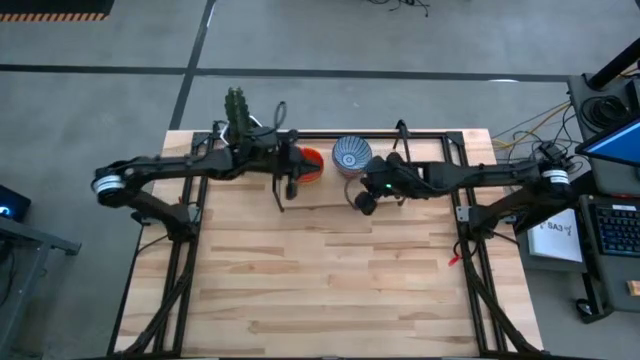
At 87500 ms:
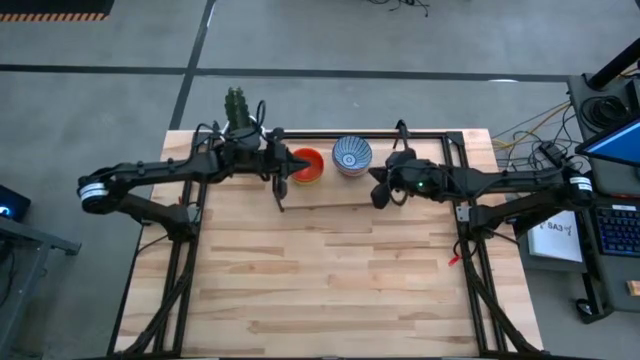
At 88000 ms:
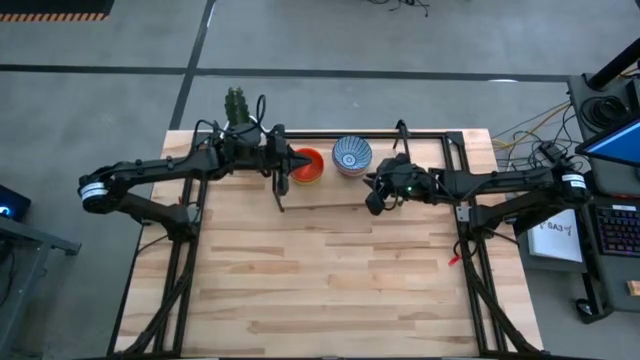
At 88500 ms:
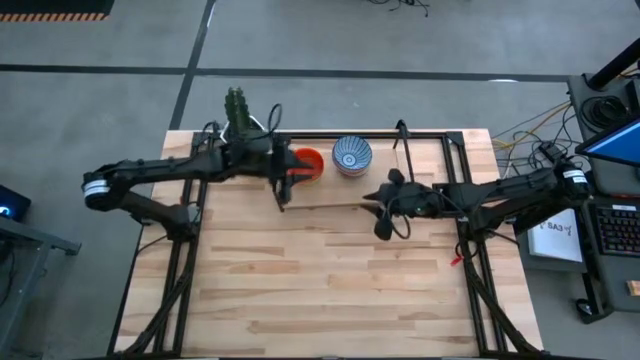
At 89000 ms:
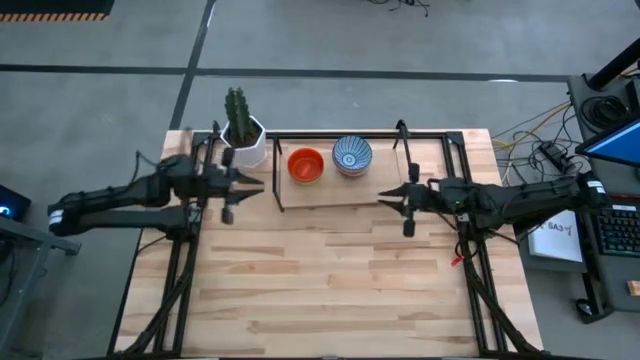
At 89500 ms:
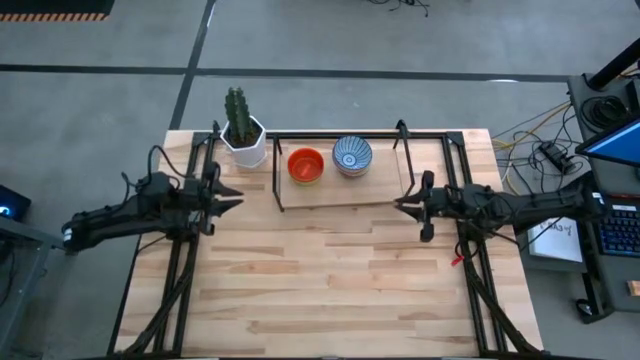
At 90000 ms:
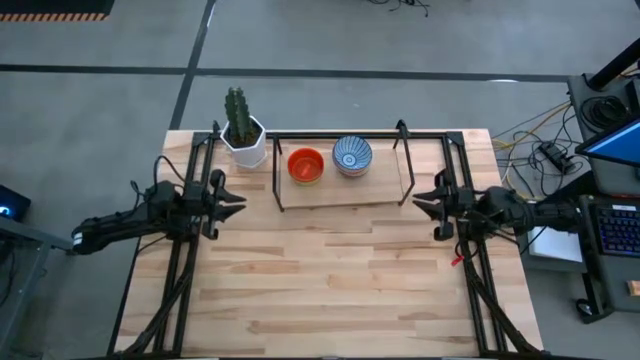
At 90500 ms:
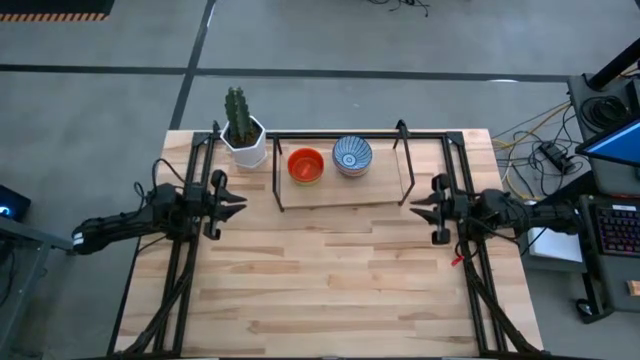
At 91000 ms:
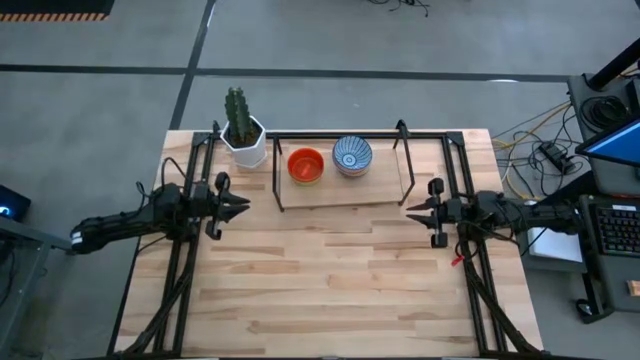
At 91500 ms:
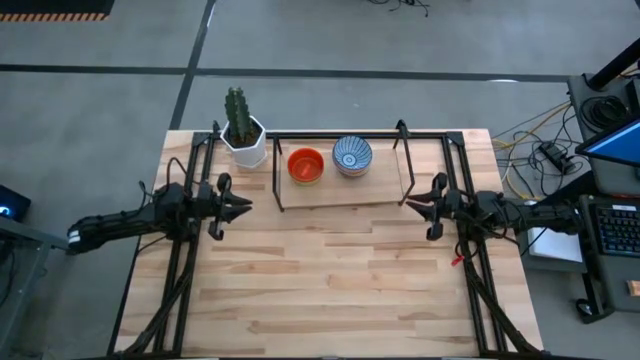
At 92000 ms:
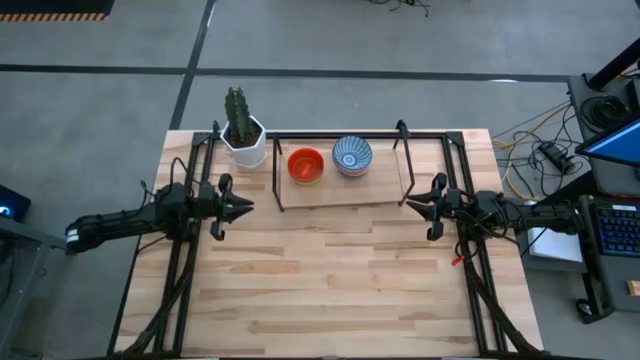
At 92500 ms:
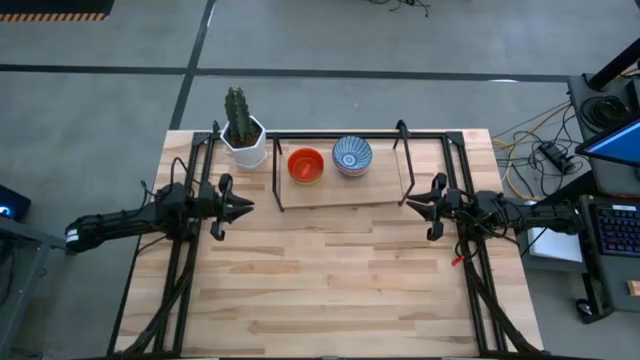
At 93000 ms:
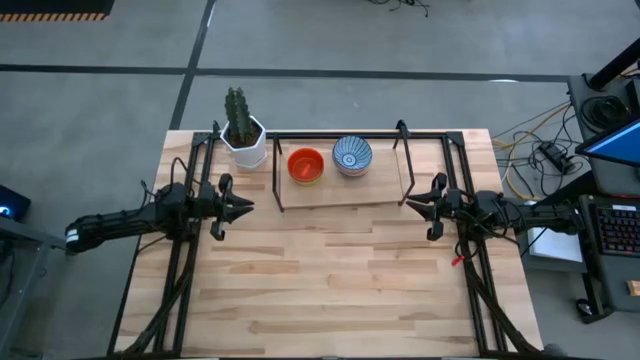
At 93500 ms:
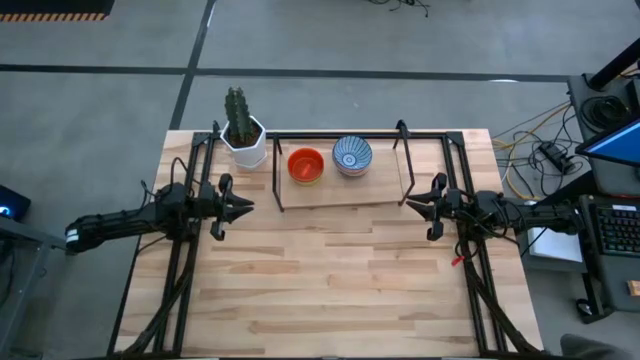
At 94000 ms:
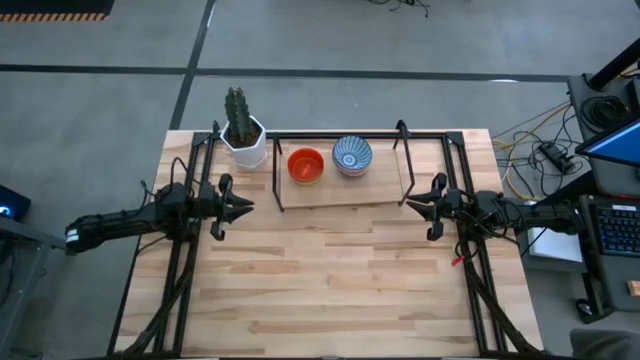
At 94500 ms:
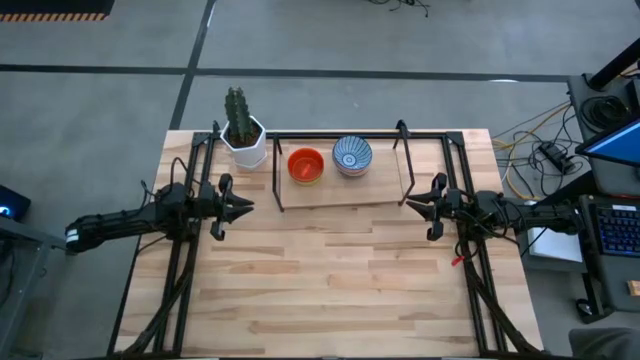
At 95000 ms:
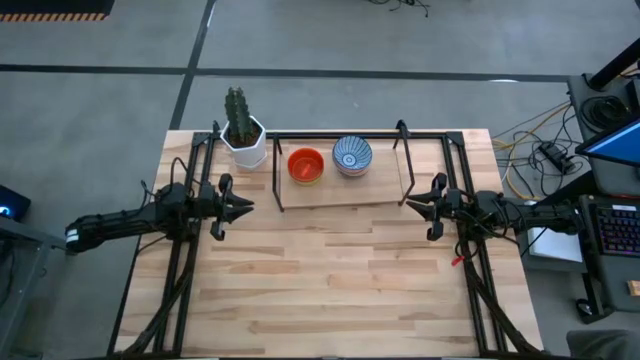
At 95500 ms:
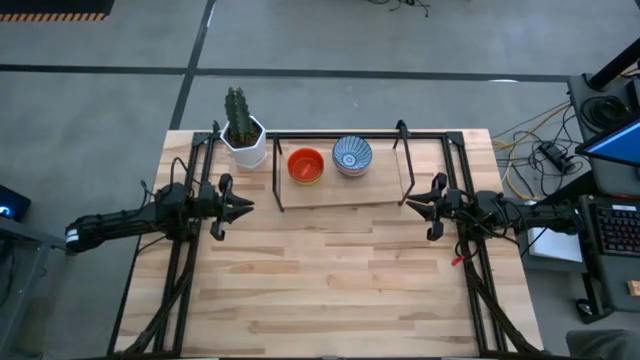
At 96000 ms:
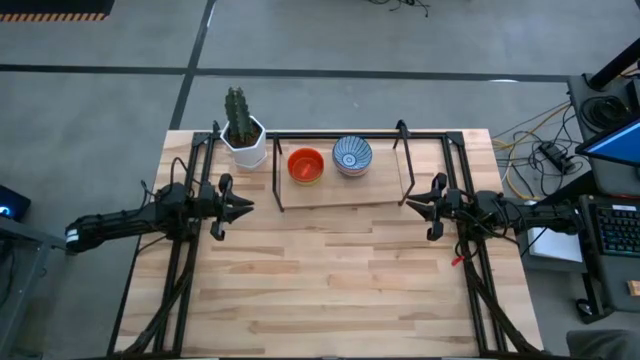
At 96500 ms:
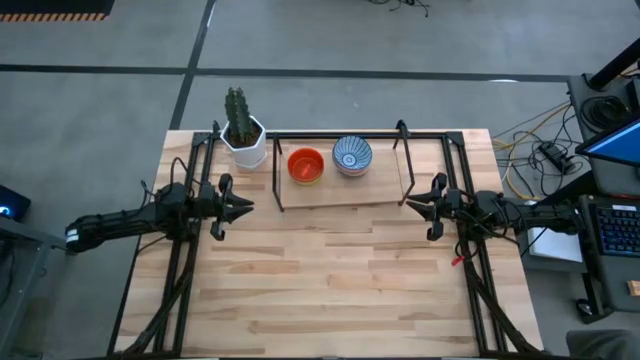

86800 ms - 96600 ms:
Task: Place and stack bowls onto a shelf
Return to Home Position

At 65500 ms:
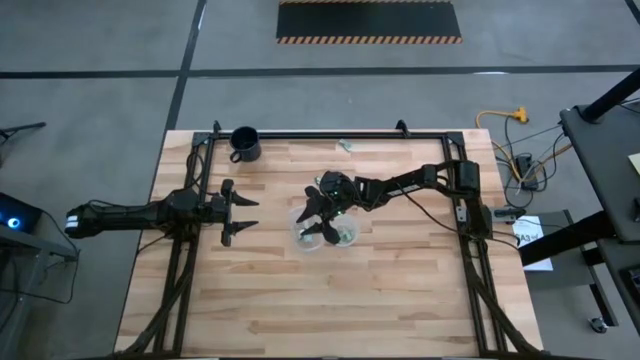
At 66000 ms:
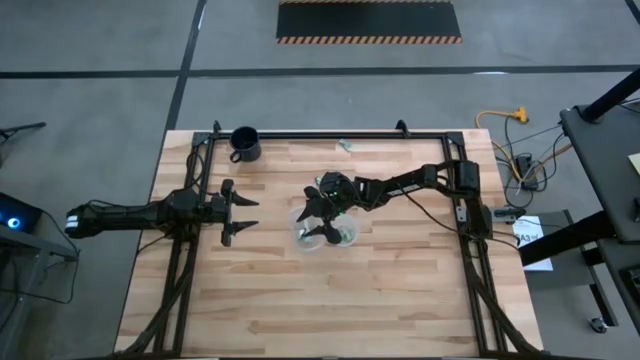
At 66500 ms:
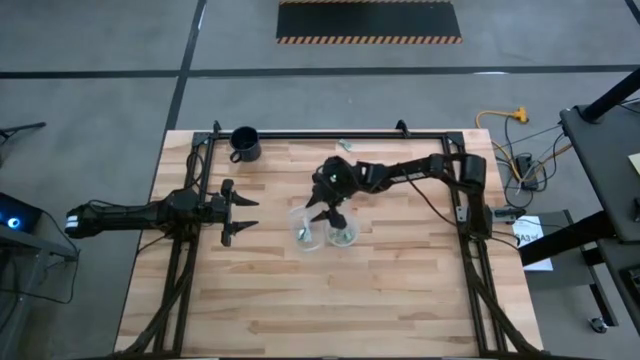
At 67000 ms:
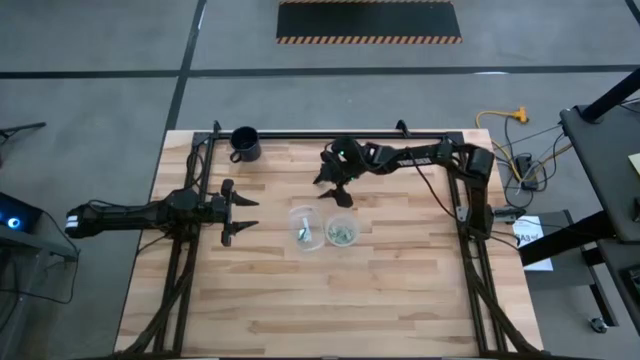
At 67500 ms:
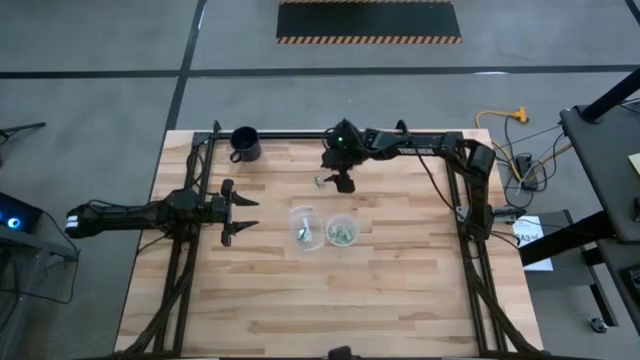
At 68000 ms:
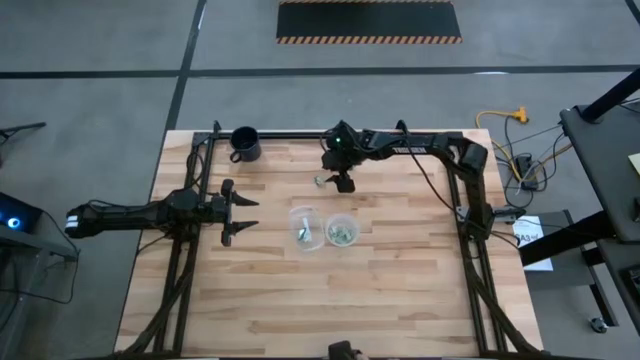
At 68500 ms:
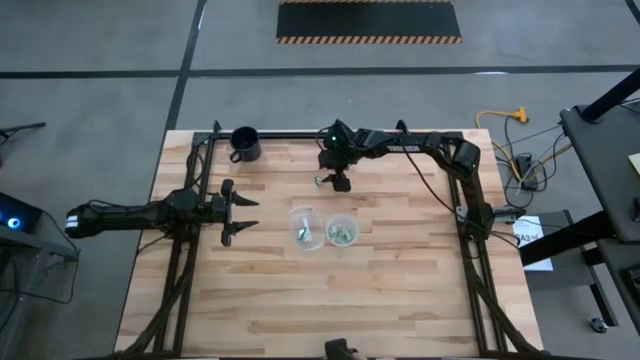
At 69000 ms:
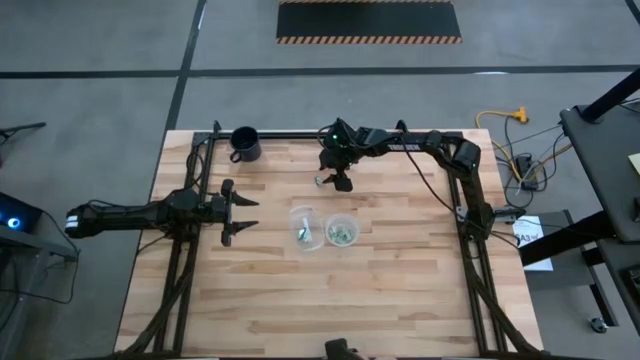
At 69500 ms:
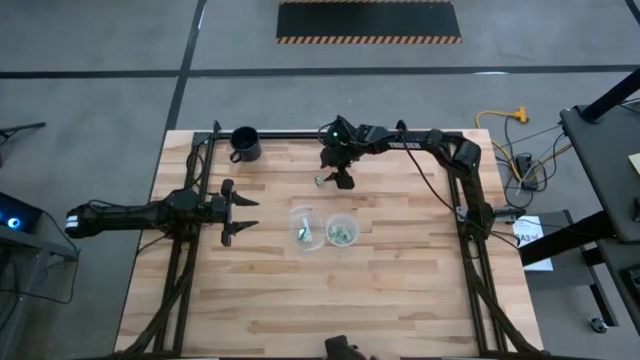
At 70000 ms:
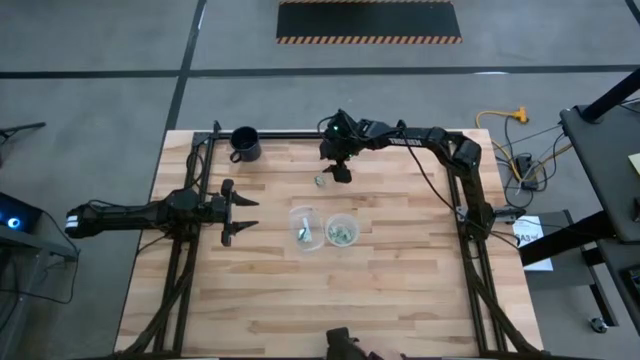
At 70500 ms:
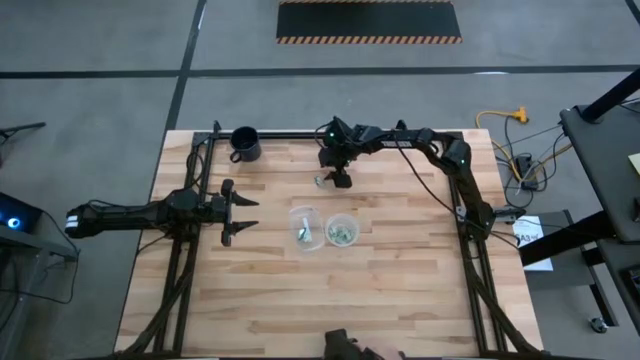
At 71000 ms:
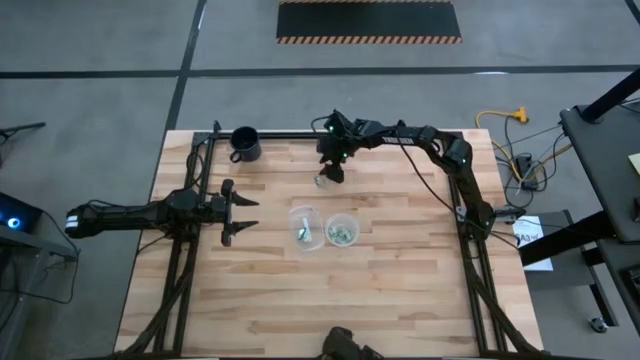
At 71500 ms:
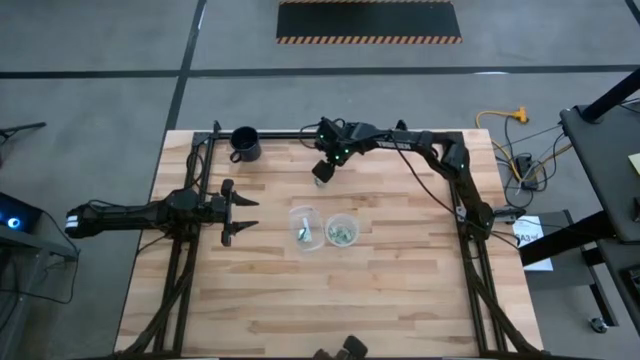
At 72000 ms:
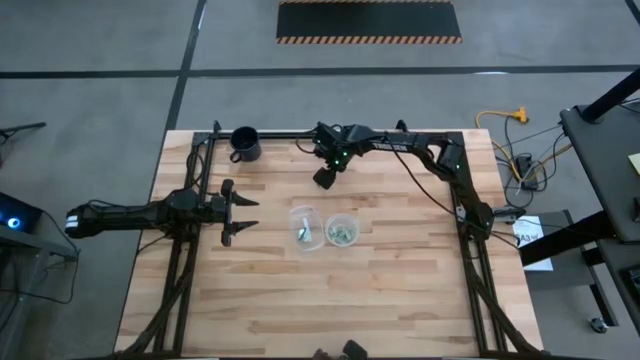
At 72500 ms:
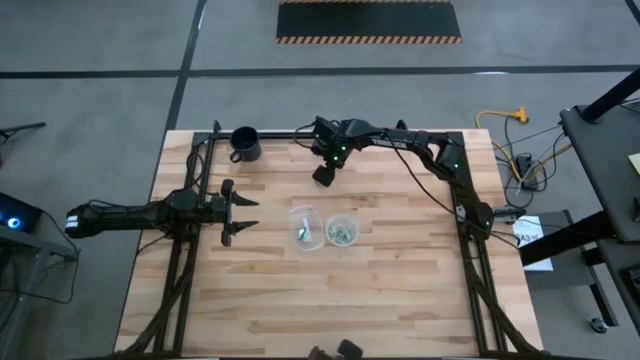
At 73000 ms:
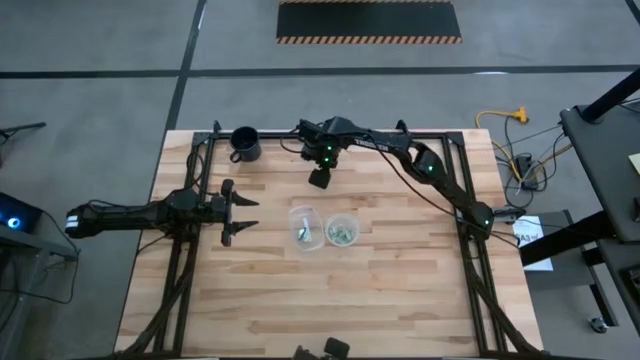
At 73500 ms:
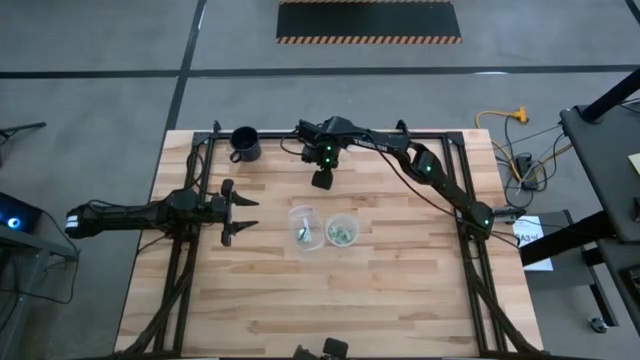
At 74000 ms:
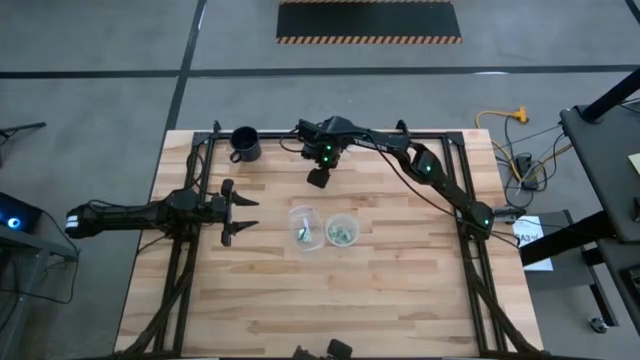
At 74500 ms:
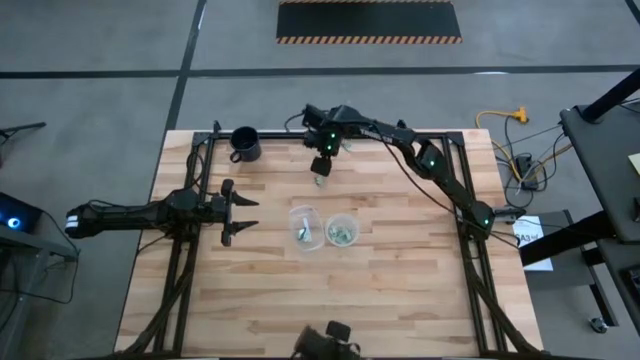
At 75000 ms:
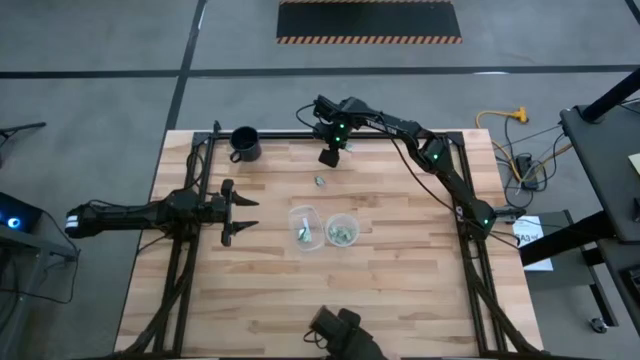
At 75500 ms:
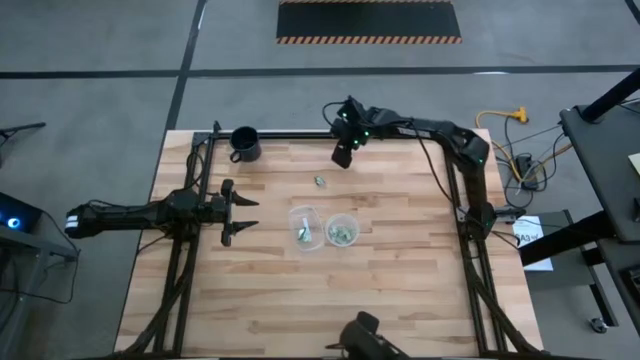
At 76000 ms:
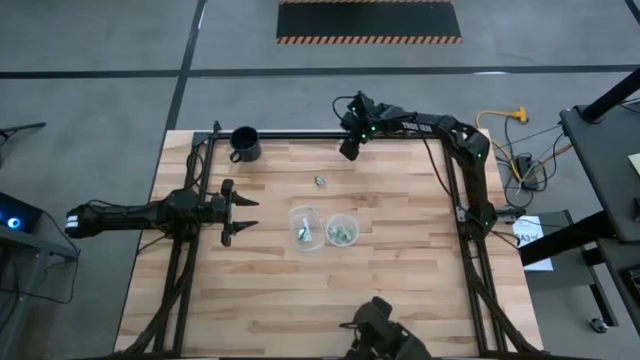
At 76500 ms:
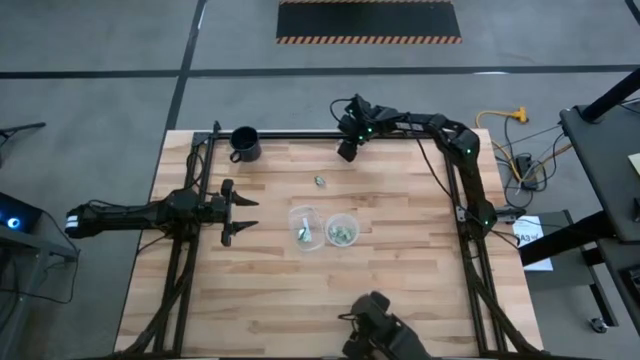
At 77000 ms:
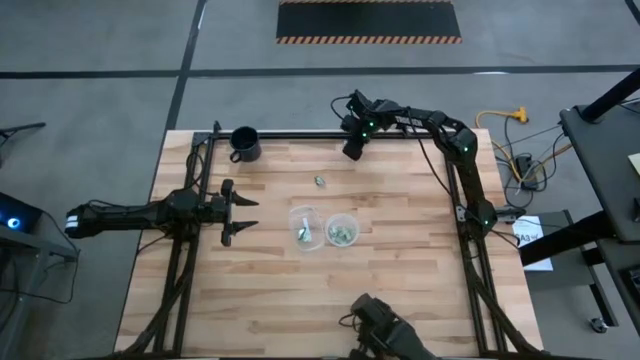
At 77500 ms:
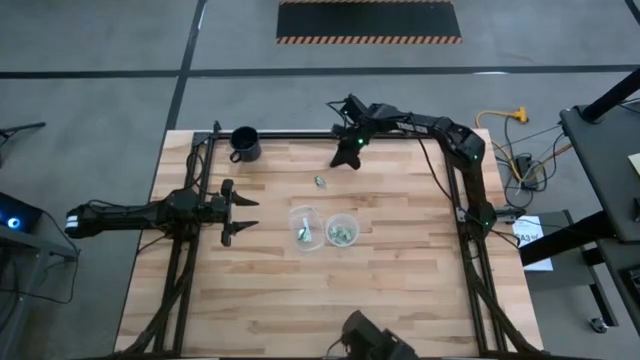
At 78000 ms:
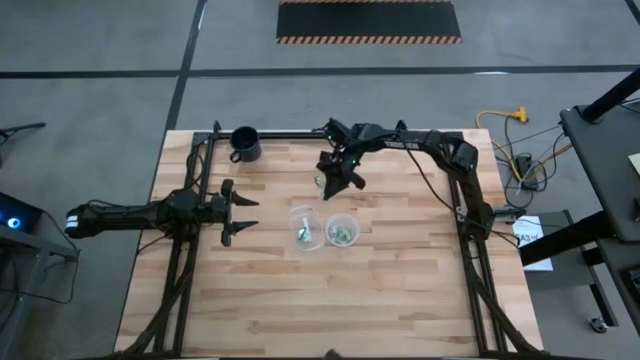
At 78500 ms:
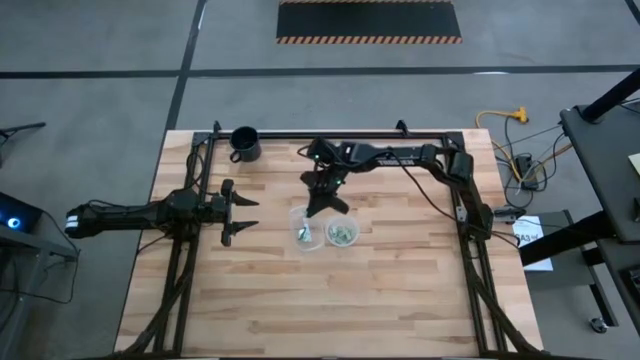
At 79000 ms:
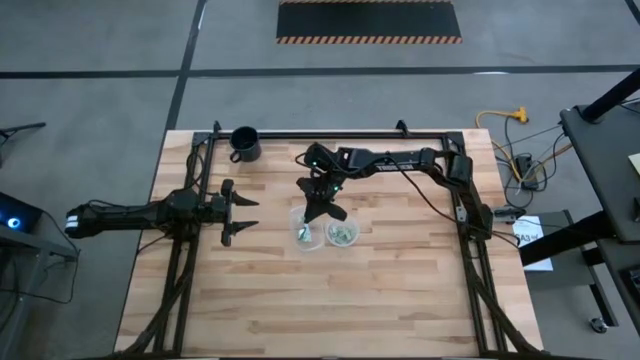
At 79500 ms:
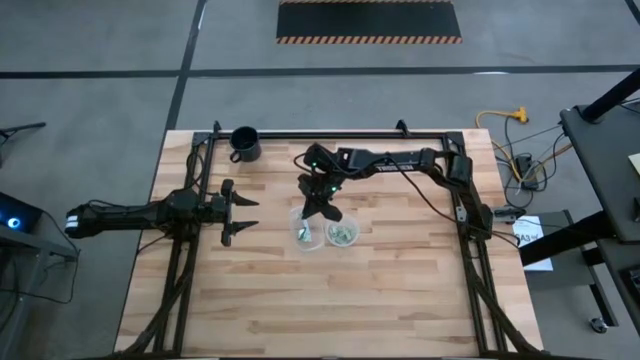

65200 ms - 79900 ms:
Task: Pick and place Stevia / Truvia into bins
Put the green truvia packet into the left transparent container
